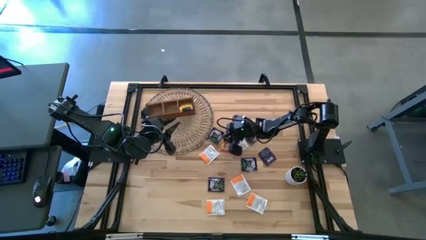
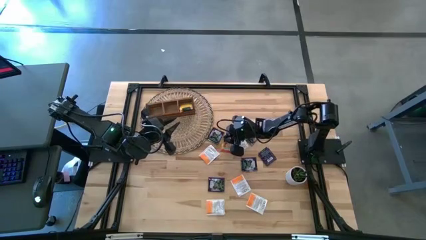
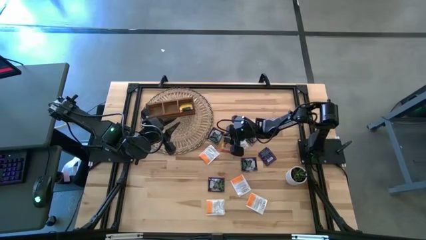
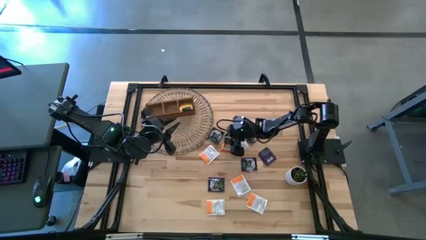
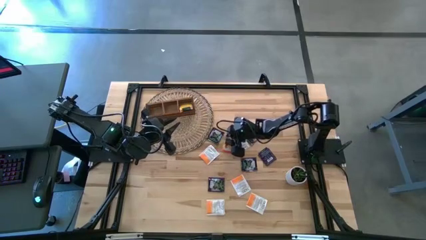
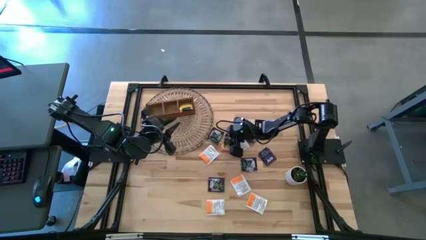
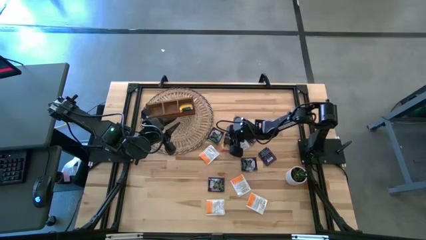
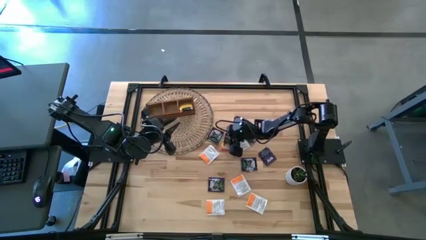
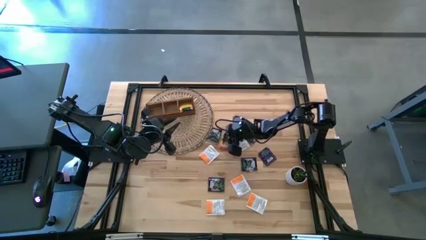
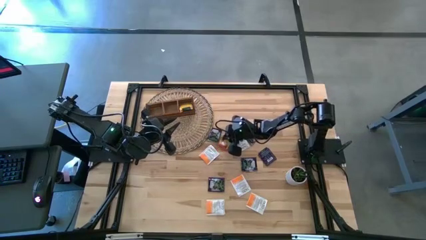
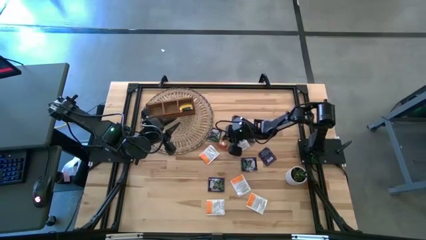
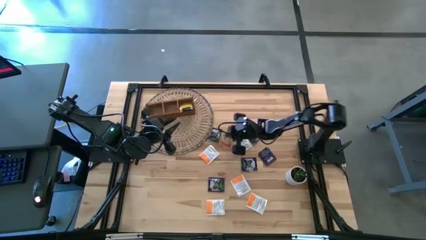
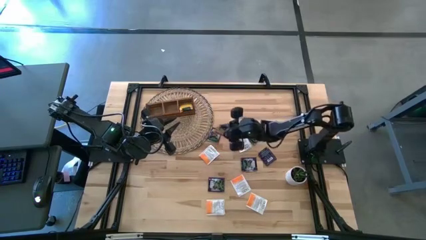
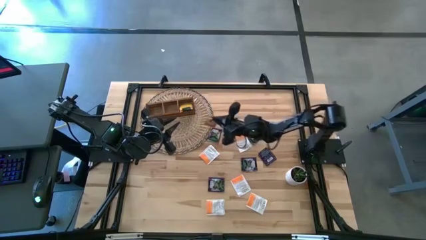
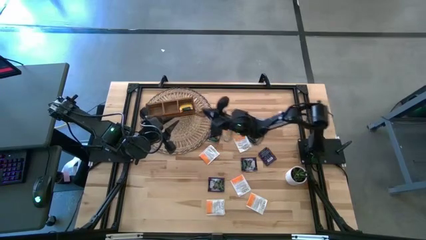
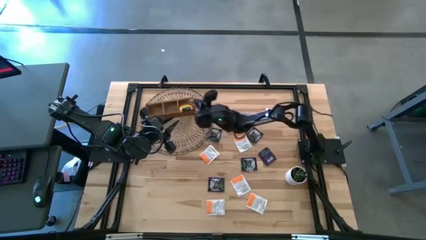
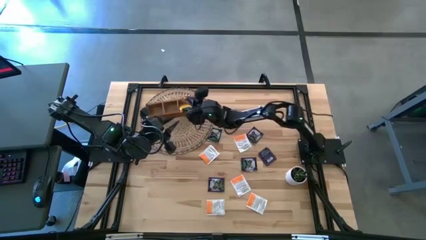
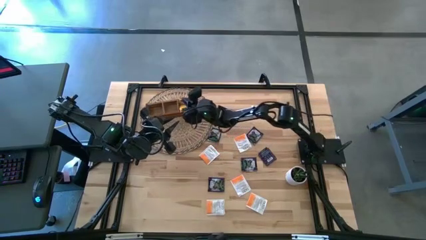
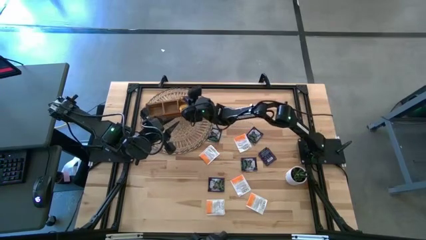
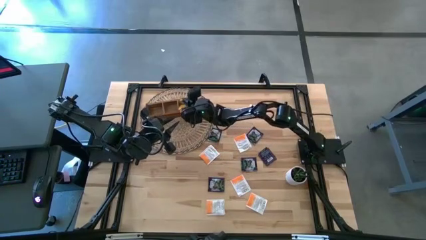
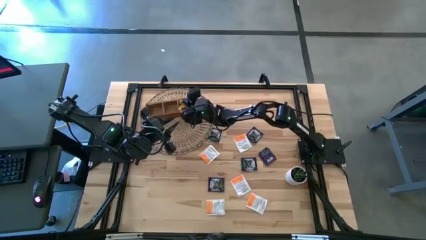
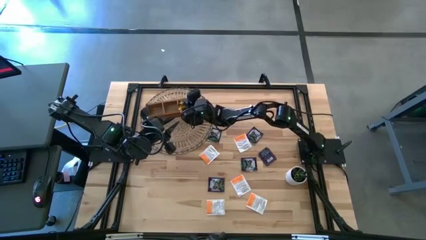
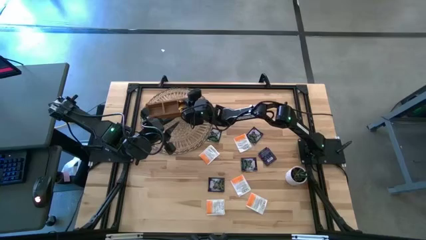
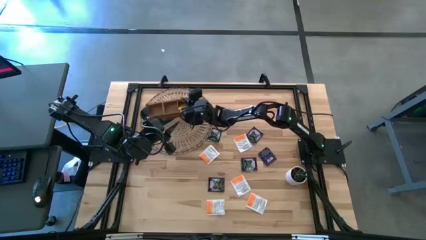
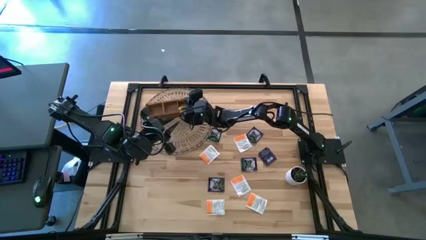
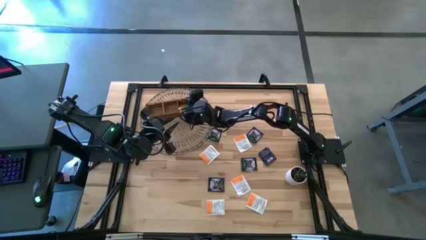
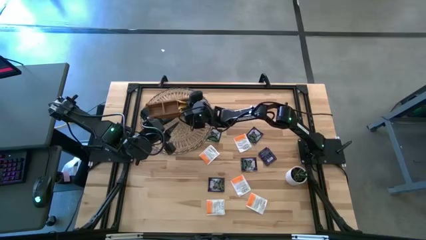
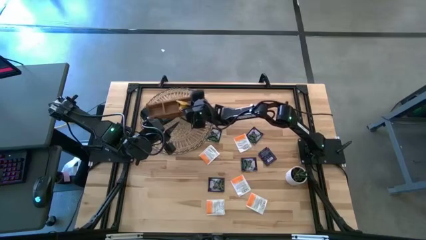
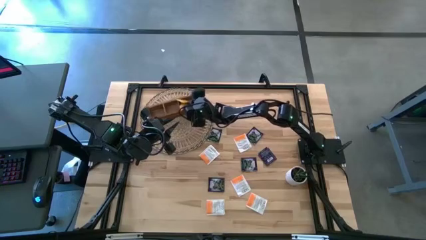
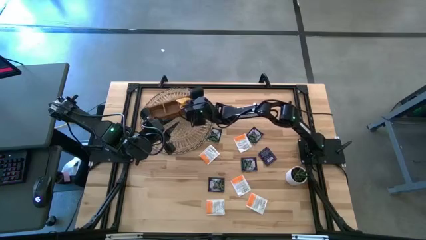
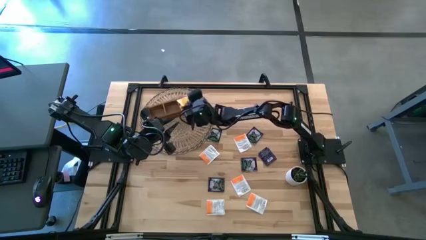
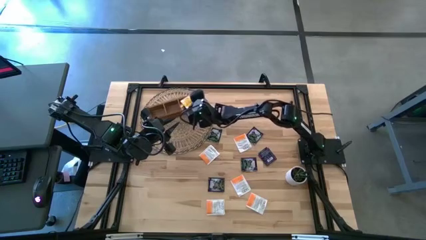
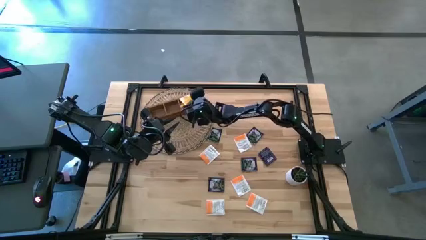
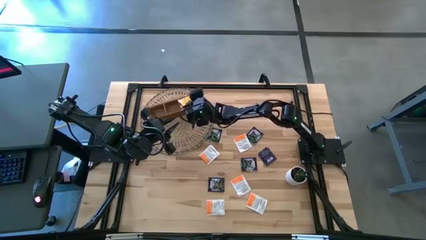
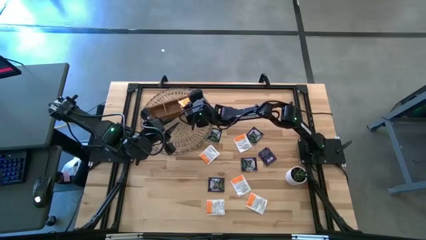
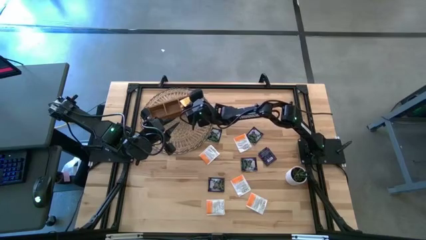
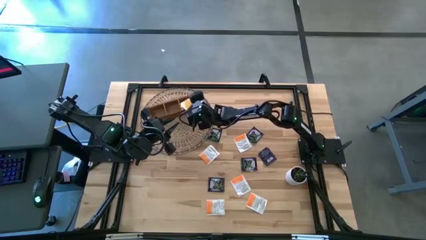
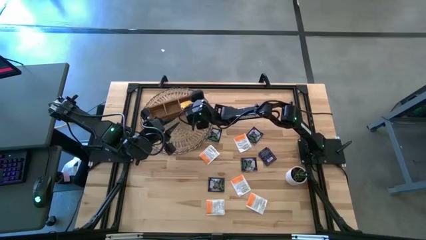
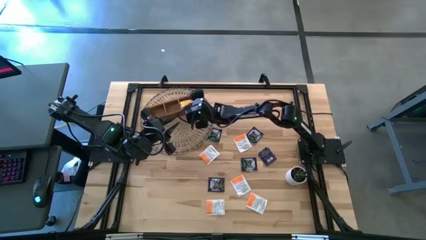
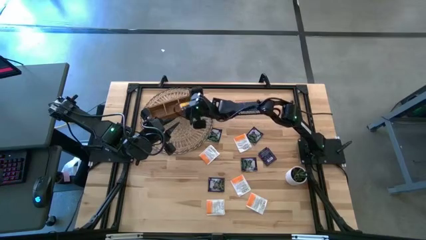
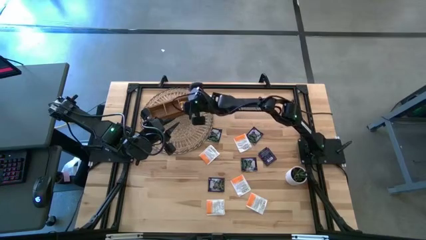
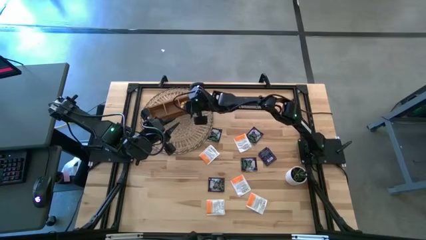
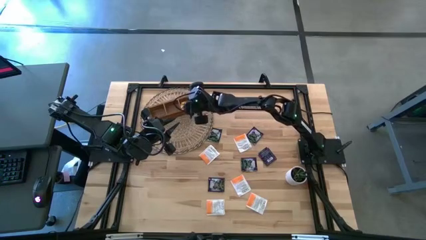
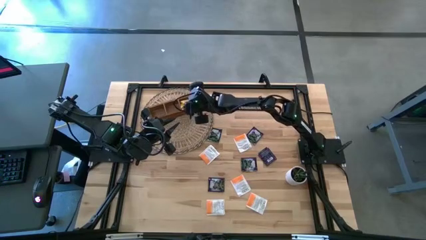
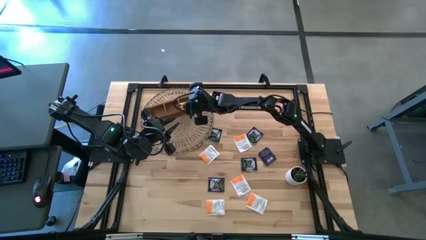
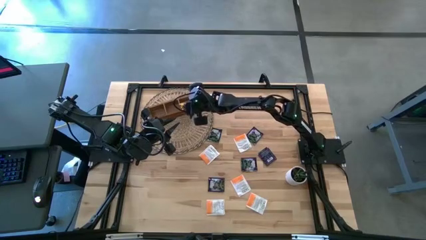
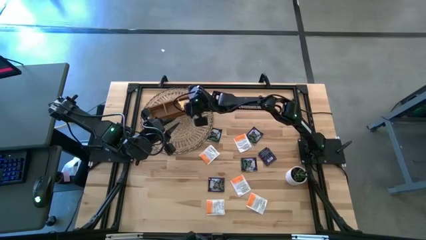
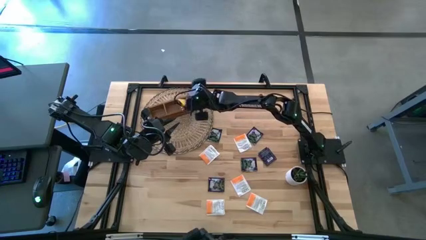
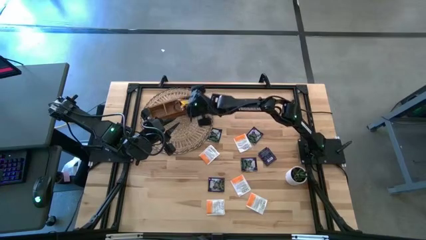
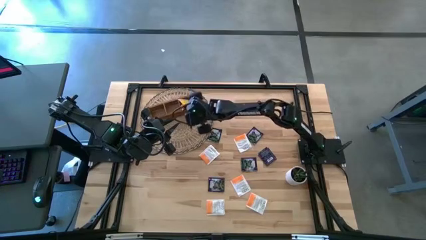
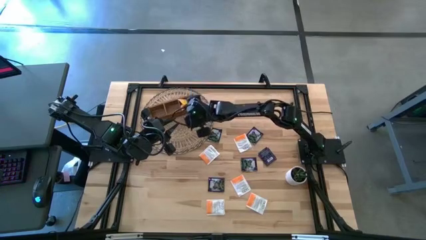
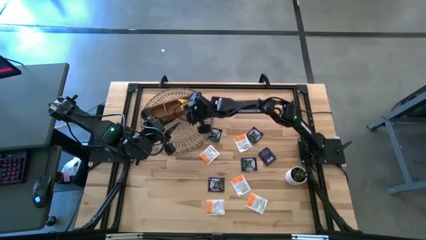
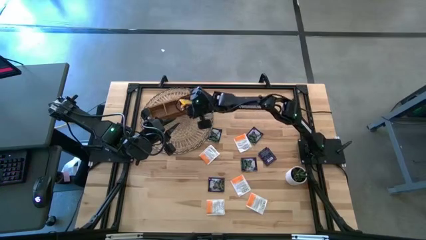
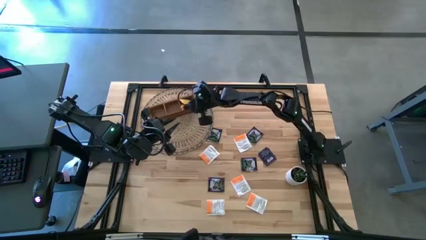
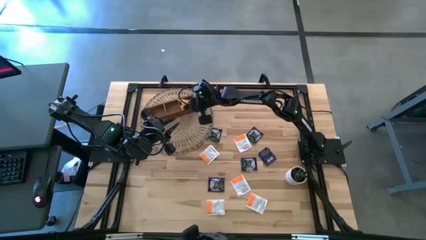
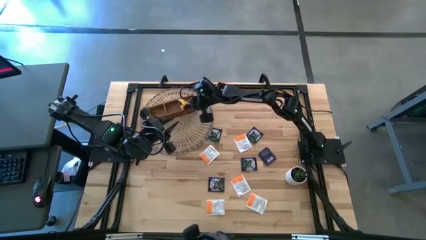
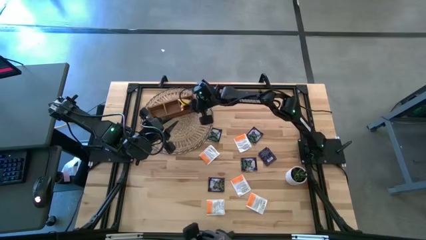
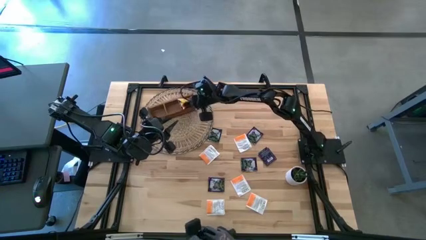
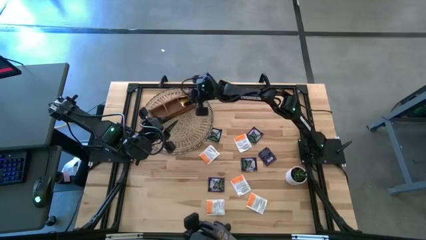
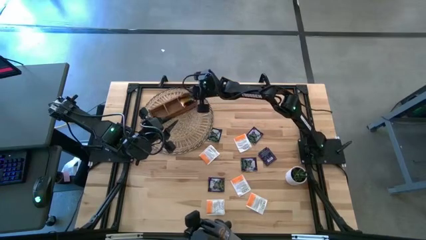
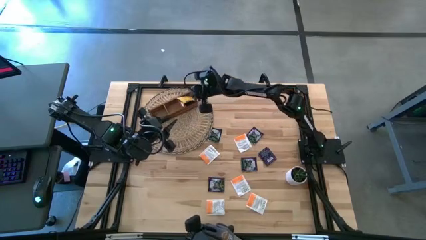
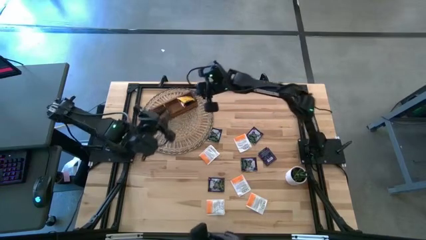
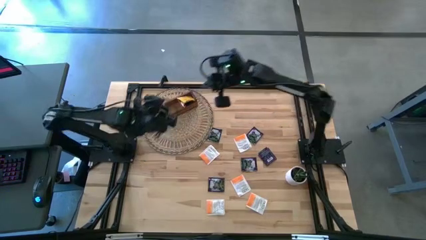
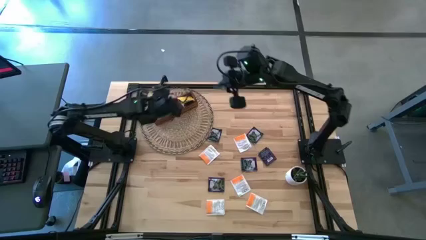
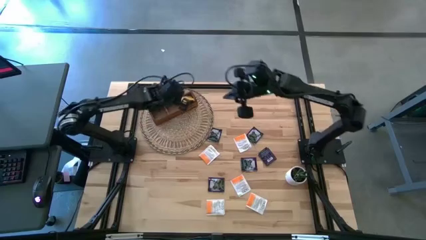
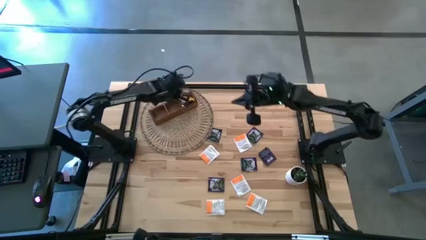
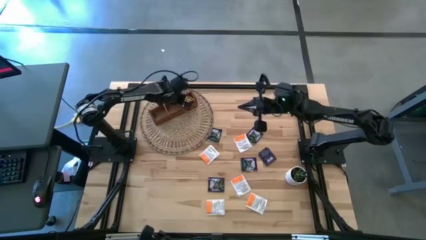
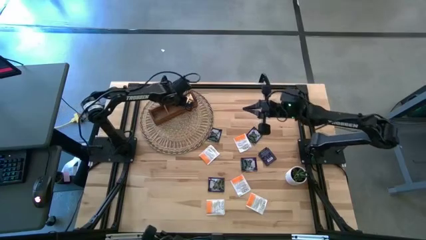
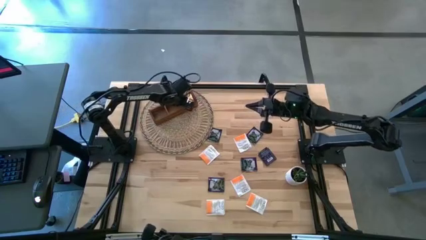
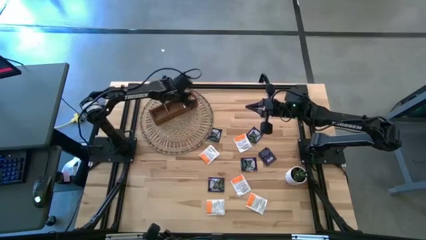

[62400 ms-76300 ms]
Task: Pick & Place Tea
Put the yellow tea bag into the right section of the wooden organizer

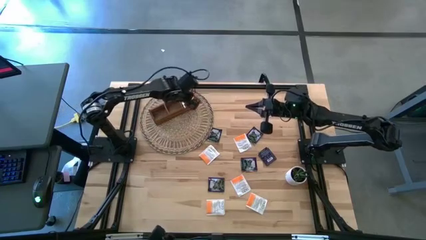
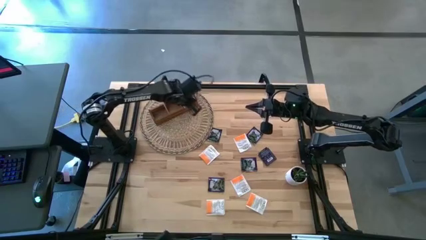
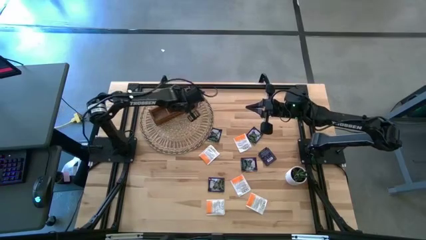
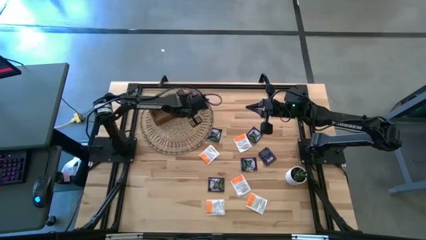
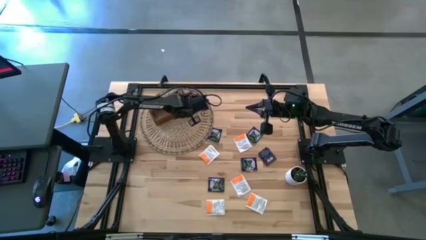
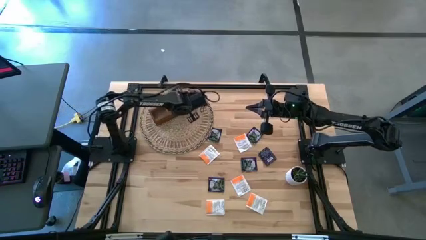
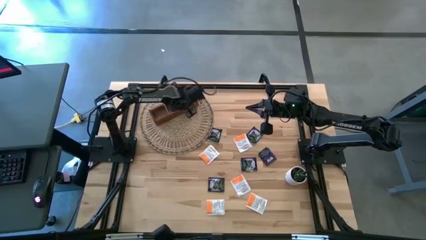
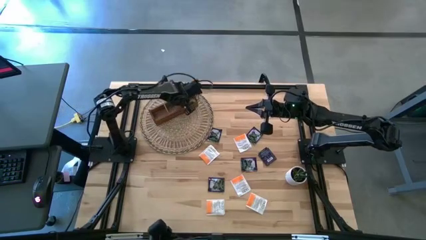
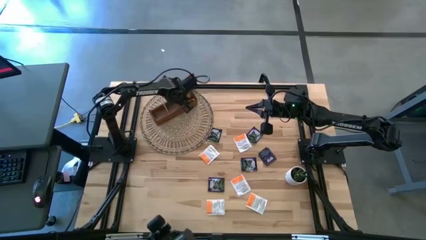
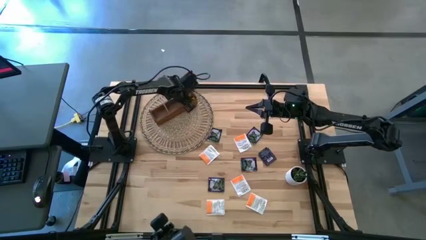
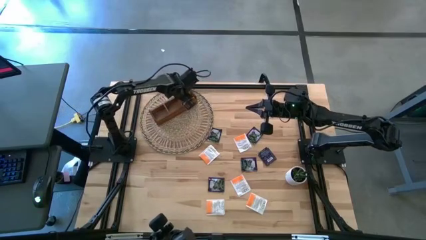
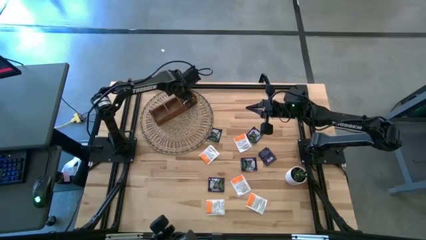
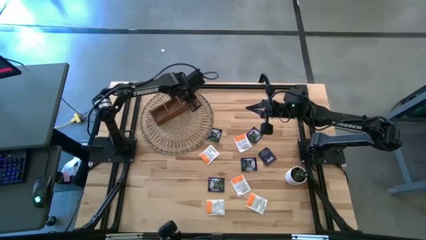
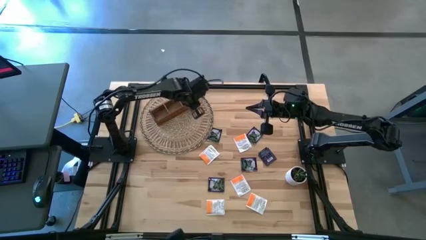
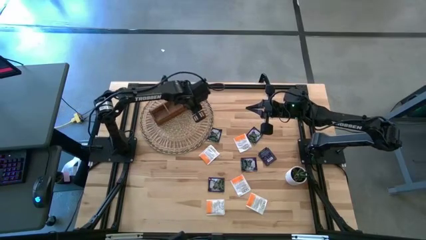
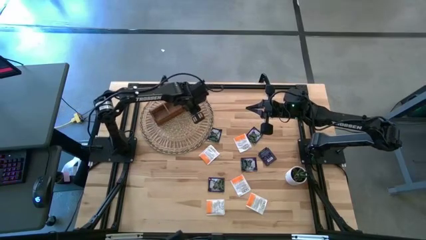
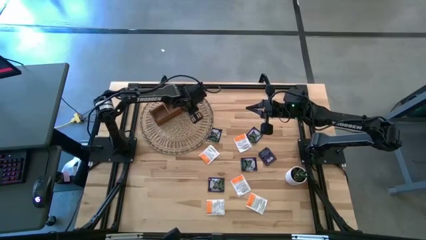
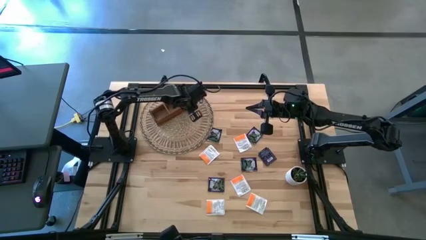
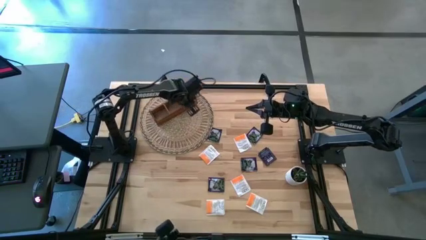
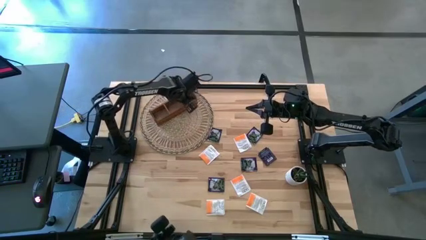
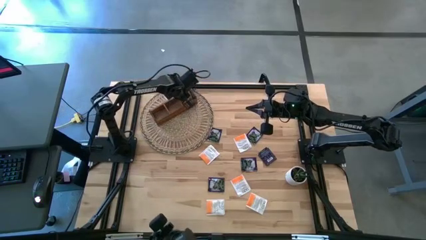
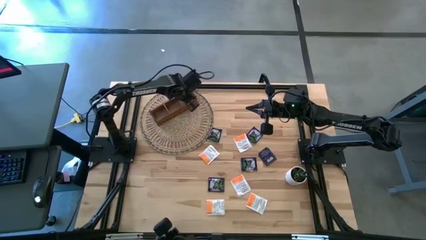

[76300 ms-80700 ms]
Adjust the yellow tea bag in the right section of the wooden organizer
